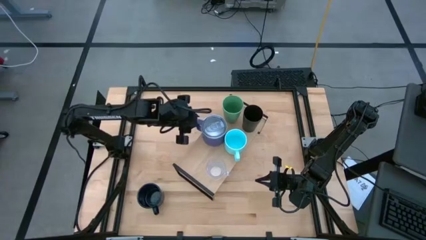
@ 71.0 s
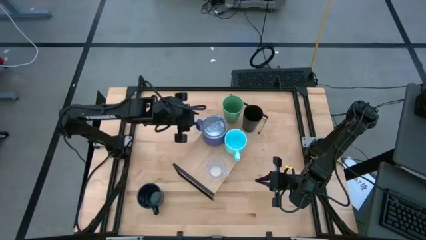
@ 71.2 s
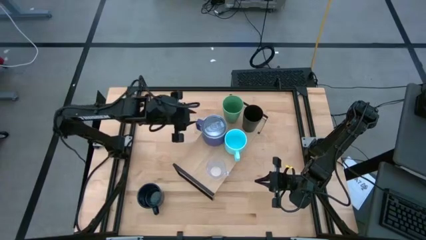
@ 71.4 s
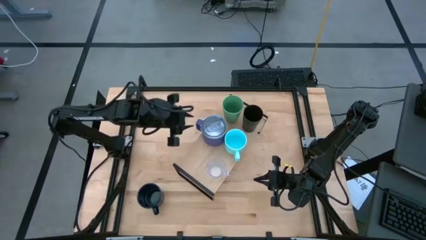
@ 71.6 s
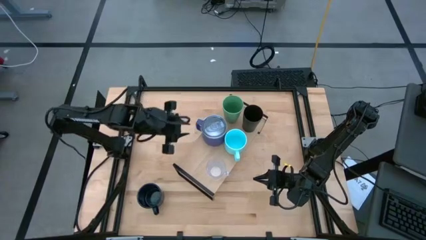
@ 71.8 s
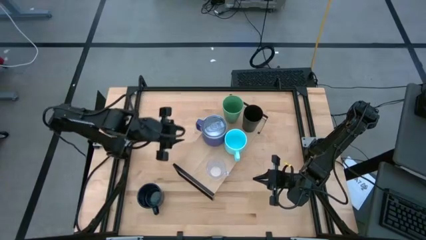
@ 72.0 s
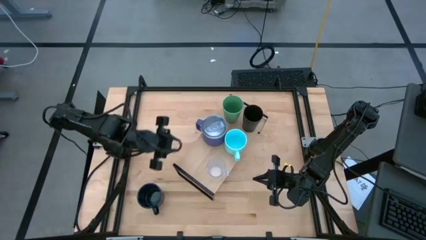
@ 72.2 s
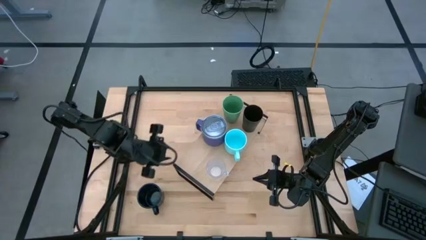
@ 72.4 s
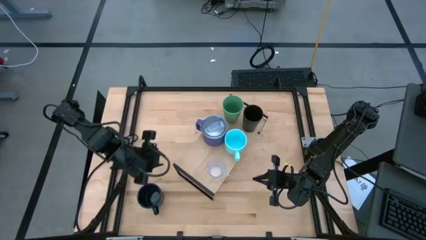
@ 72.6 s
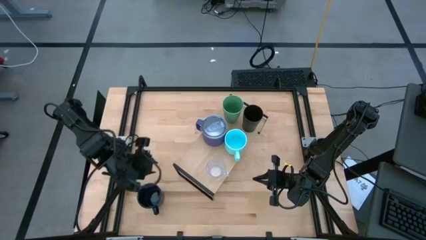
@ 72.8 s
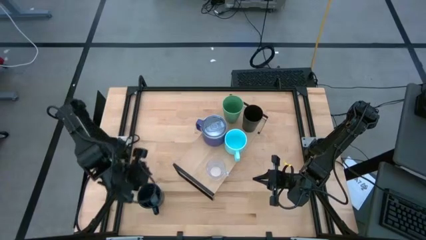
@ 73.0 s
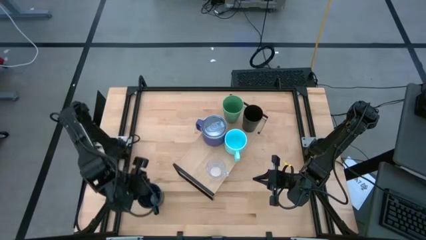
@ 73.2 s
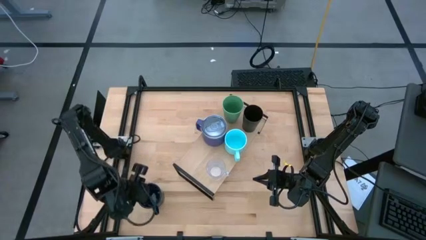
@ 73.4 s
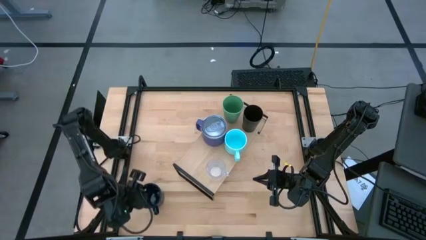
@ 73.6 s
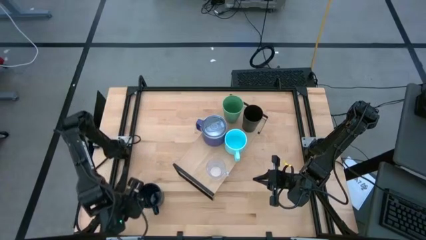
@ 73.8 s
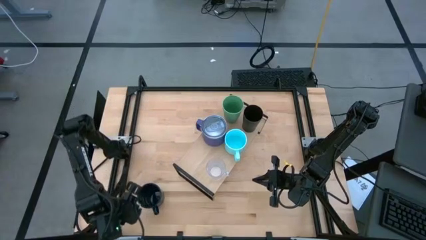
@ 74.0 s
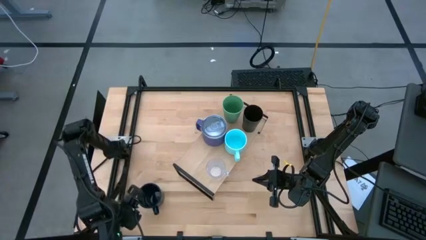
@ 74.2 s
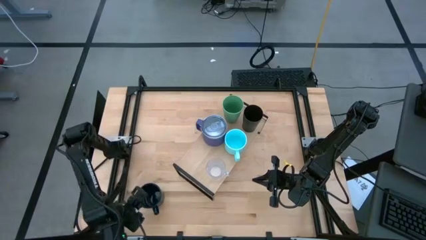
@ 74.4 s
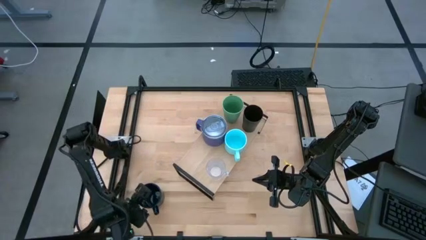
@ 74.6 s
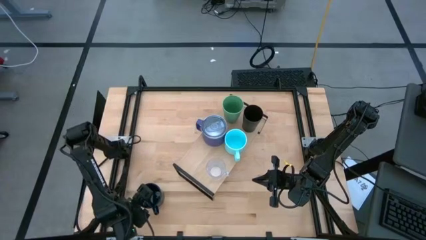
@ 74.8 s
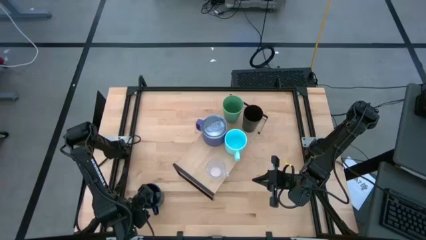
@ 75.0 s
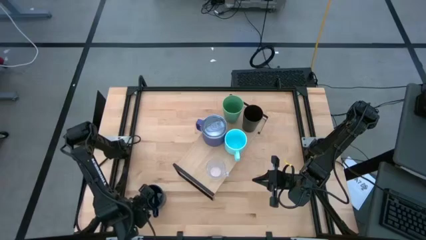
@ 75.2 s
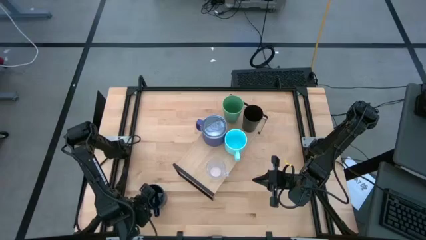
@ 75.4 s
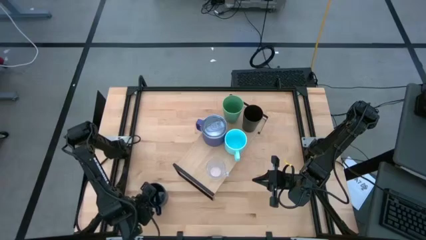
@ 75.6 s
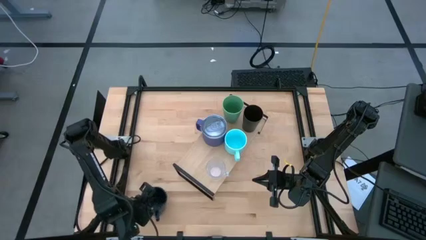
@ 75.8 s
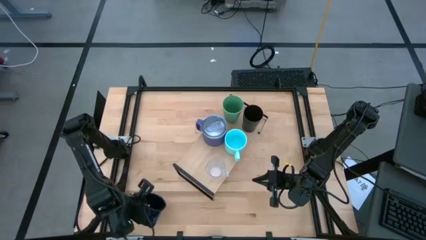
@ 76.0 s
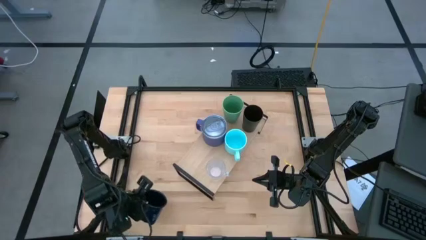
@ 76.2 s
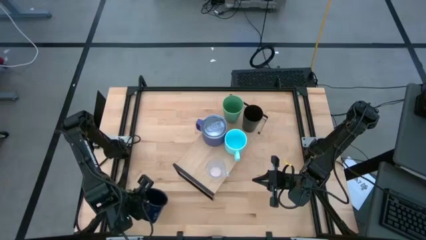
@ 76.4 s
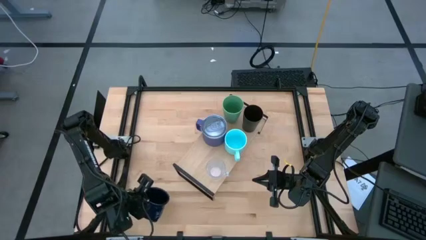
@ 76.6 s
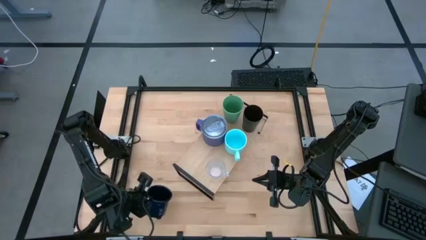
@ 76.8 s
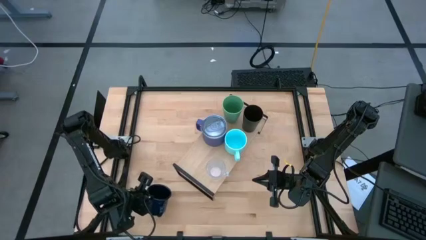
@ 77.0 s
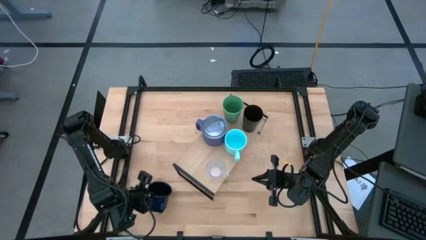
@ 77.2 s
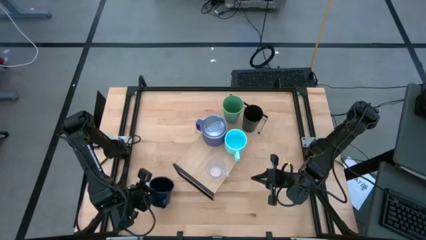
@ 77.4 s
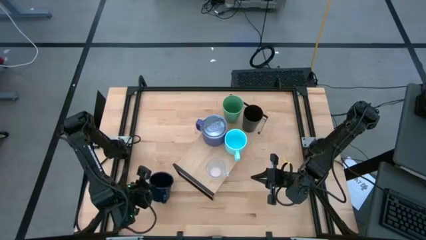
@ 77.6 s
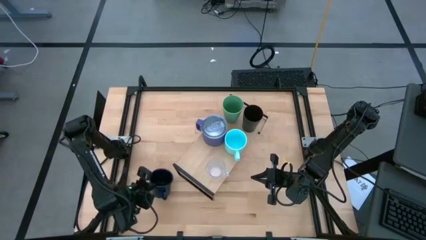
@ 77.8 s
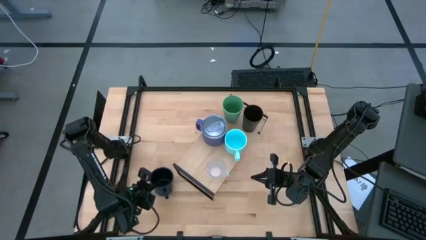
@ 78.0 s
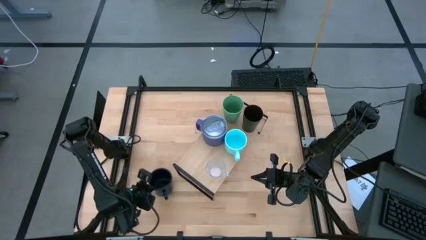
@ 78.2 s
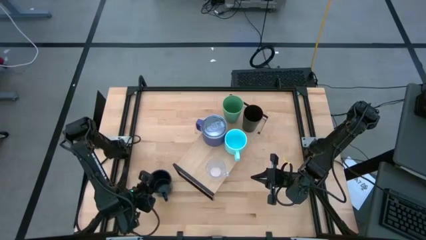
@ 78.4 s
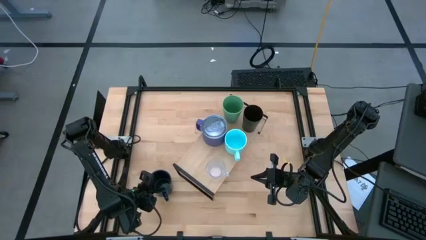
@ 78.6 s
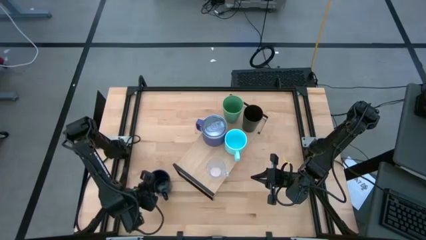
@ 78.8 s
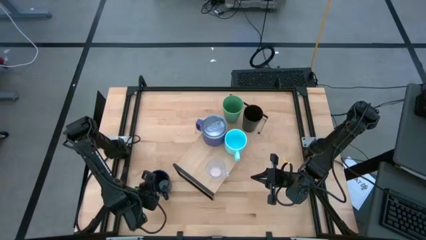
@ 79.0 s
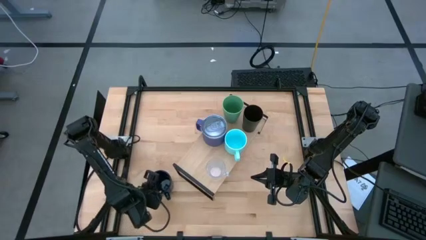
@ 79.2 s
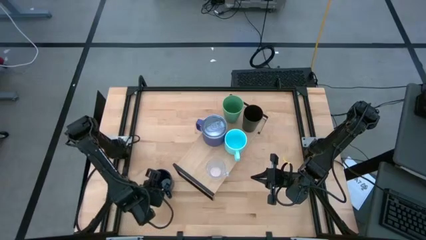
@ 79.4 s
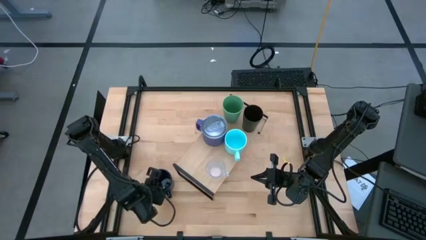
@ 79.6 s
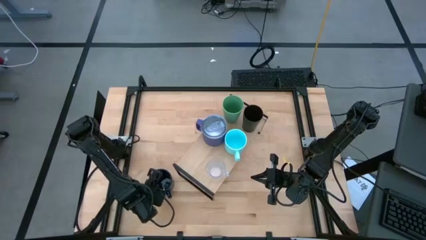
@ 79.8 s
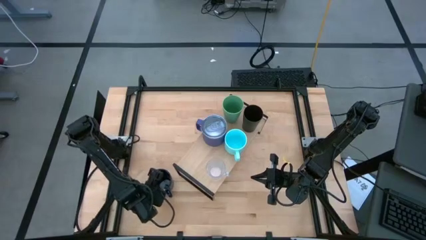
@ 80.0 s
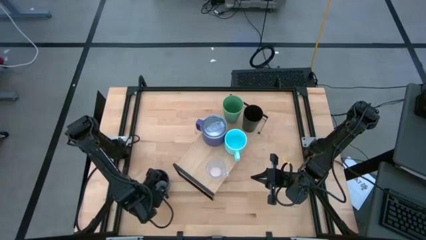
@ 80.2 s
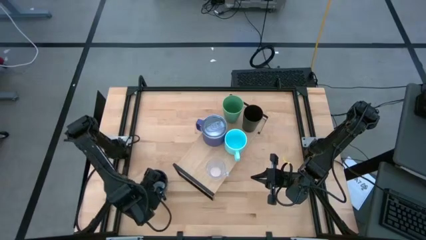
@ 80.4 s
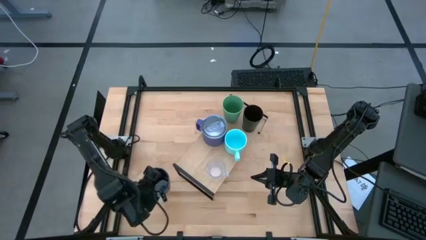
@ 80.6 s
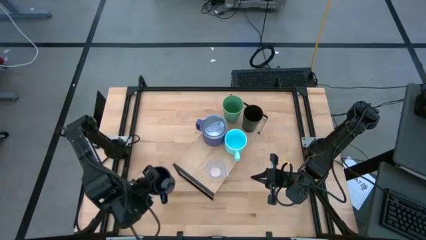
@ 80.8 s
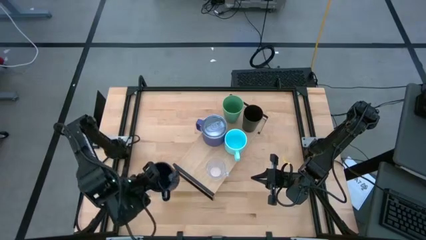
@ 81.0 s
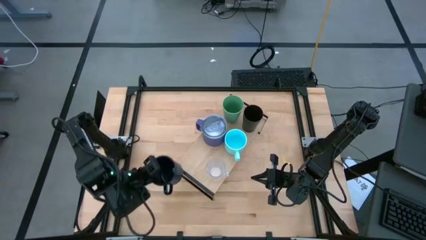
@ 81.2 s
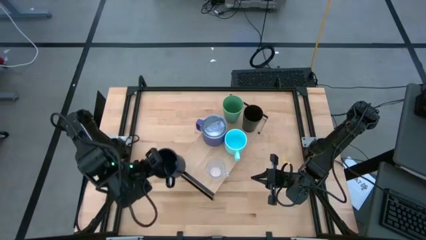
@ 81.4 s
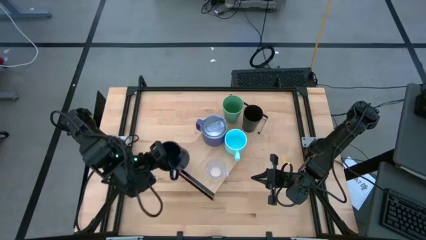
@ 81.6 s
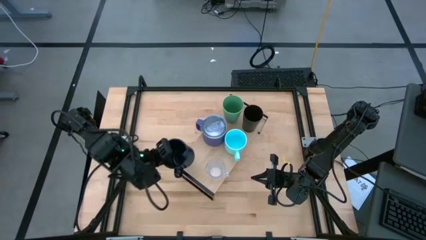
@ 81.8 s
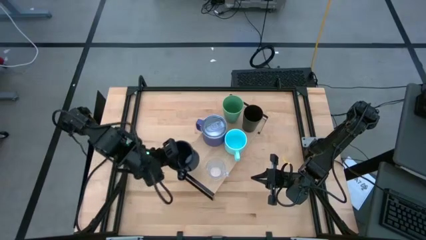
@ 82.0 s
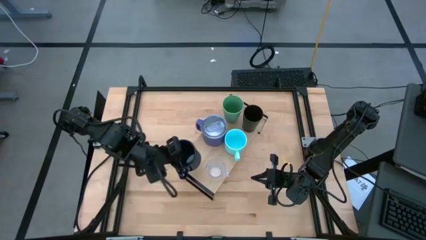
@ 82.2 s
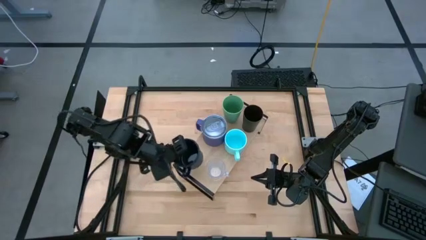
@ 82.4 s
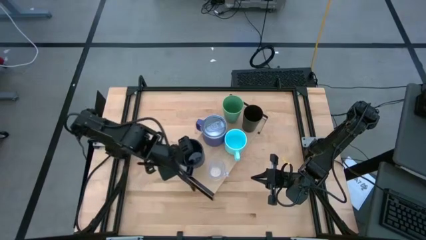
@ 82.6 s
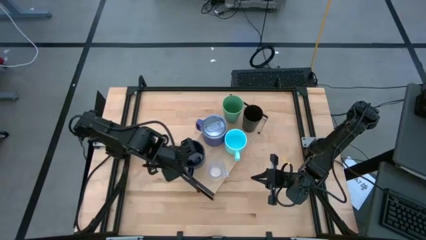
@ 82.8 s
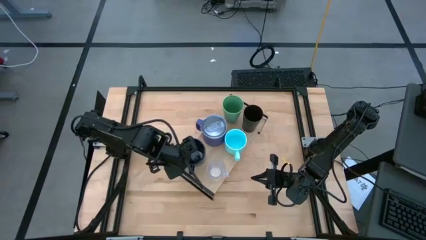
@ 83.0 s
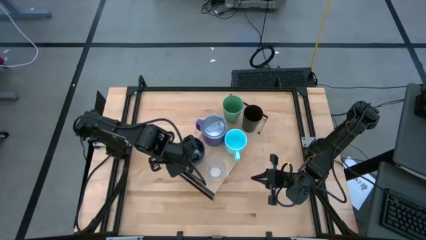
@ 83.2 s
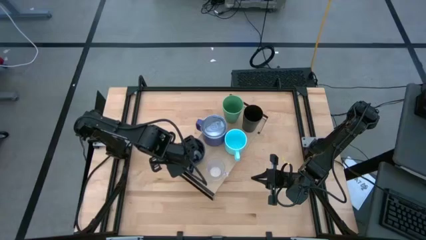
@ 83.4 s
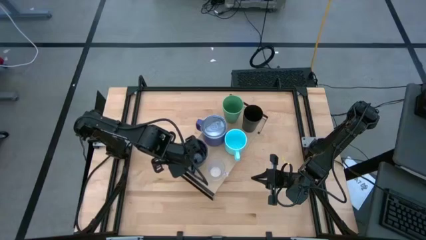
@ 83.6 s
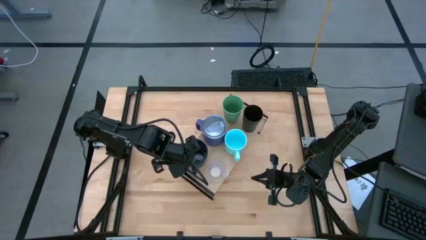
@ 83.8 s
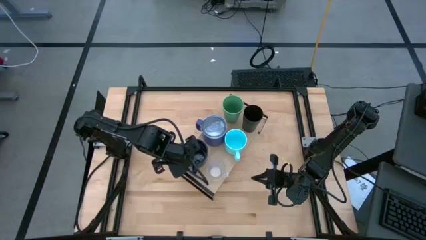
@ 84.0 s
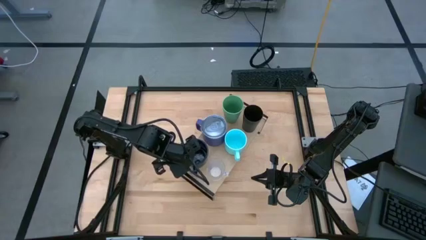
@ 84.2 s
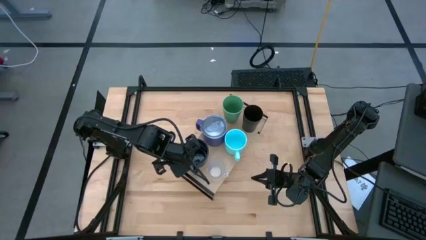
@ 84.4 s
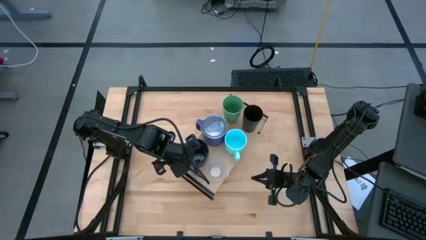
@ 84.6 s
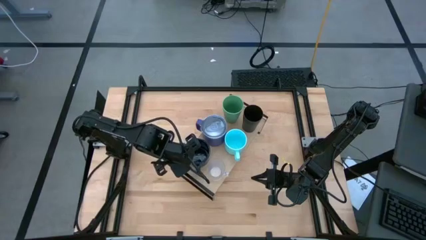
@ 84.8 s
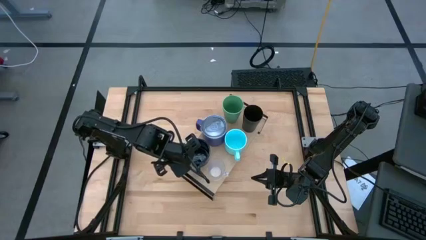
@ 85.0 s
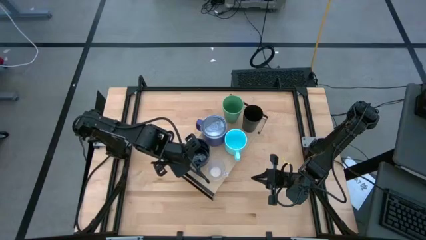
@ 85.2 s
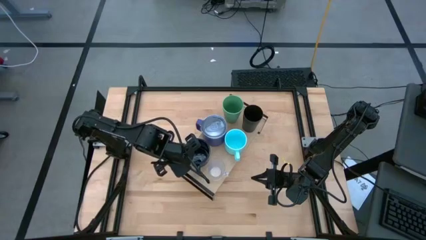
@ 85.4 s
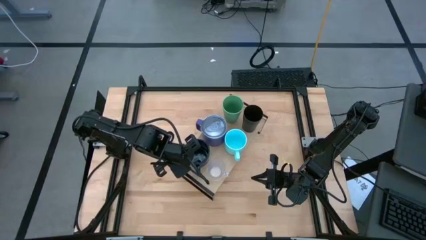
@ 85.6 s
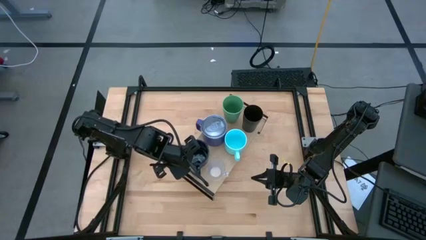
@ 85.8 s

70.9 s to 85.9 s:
Task: Stack small to large cups/mugs on shelf
Put the dark blue mug on the shelf
